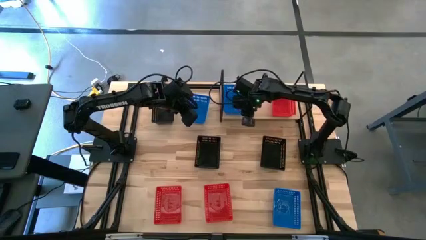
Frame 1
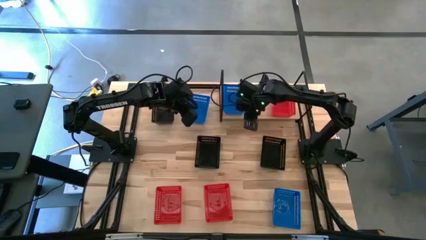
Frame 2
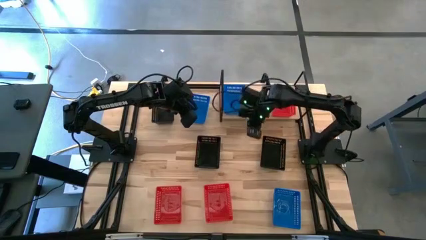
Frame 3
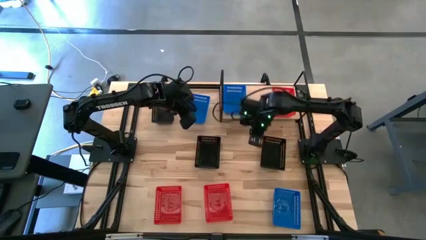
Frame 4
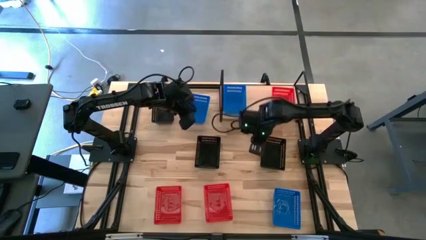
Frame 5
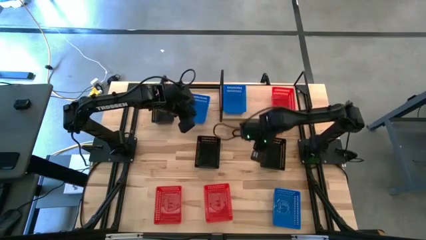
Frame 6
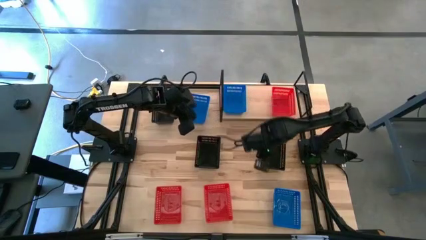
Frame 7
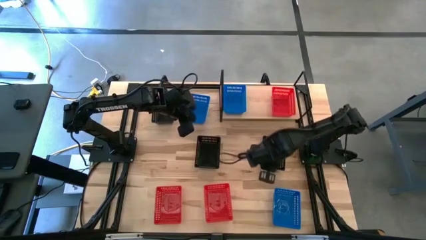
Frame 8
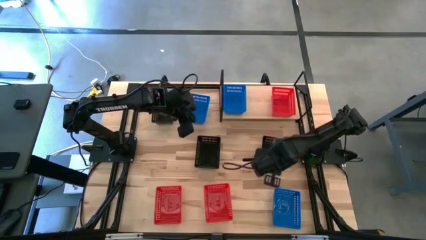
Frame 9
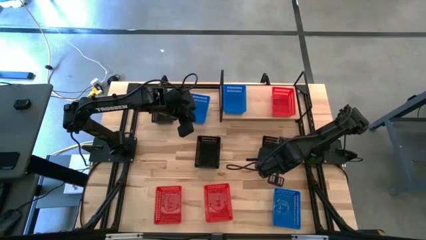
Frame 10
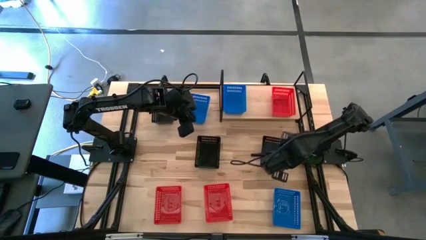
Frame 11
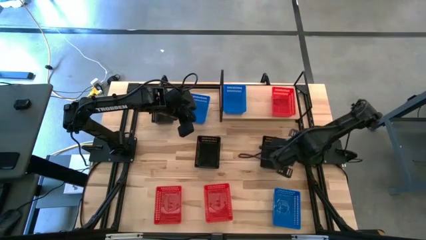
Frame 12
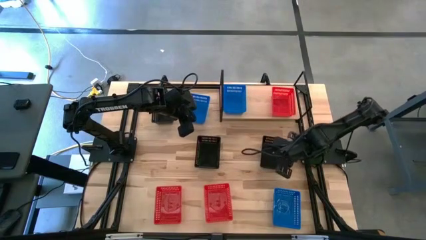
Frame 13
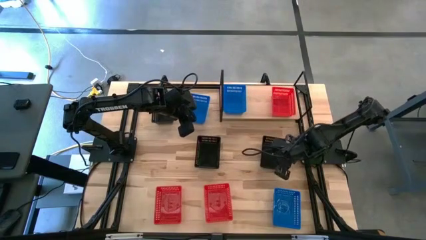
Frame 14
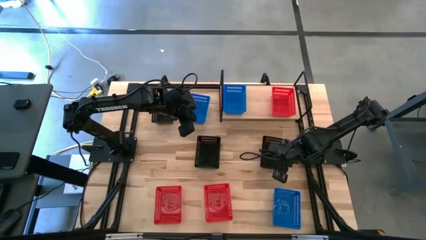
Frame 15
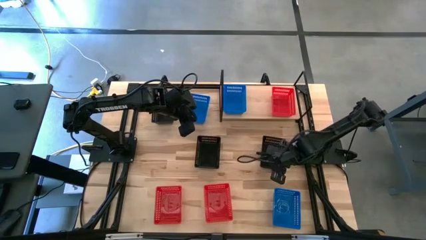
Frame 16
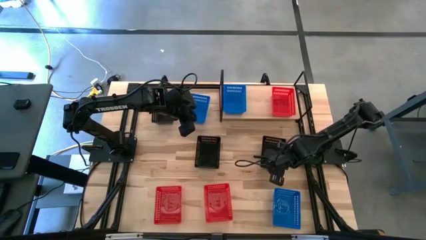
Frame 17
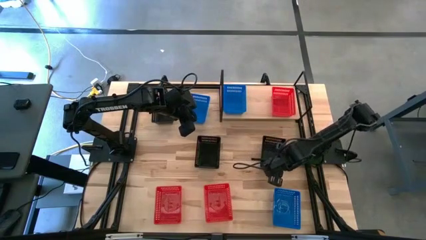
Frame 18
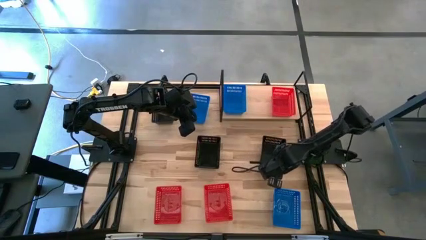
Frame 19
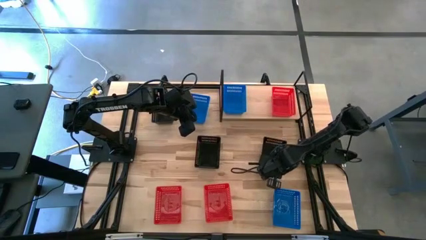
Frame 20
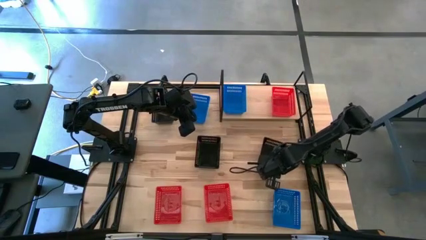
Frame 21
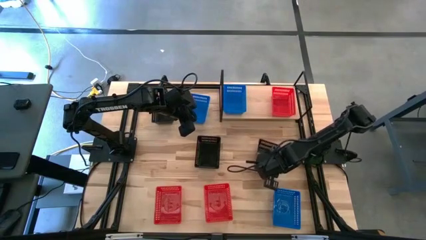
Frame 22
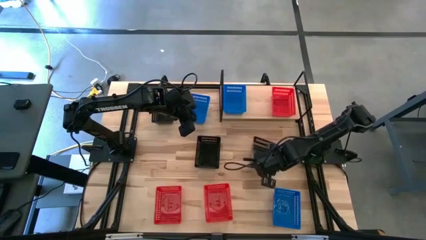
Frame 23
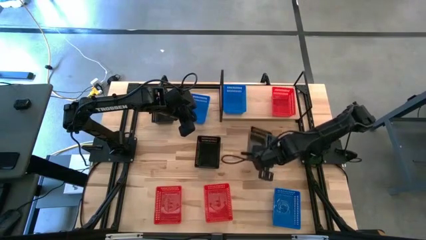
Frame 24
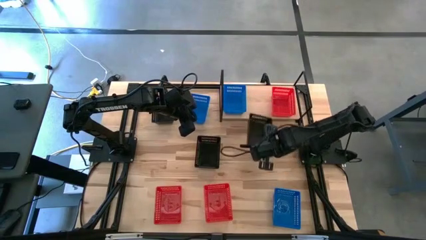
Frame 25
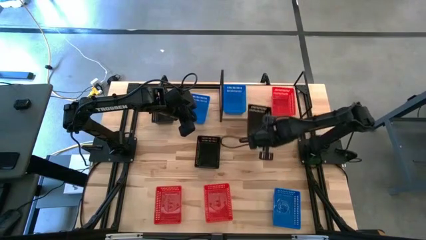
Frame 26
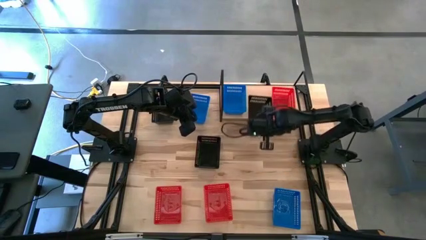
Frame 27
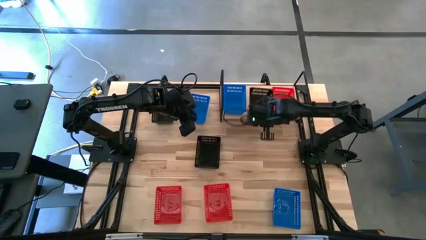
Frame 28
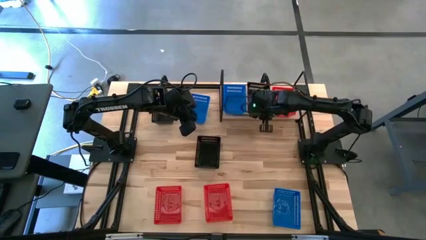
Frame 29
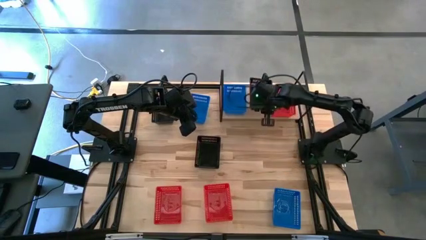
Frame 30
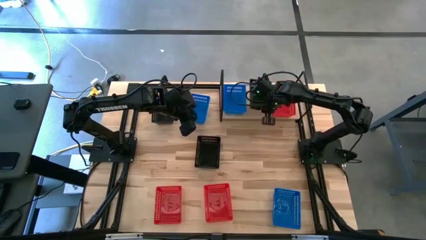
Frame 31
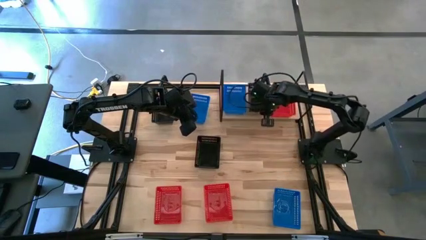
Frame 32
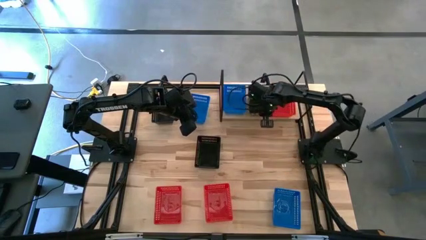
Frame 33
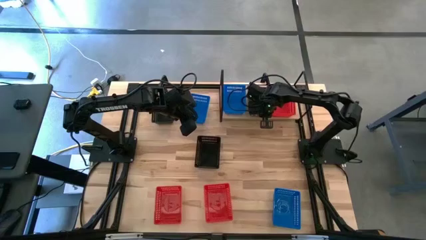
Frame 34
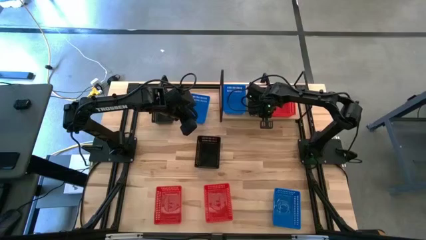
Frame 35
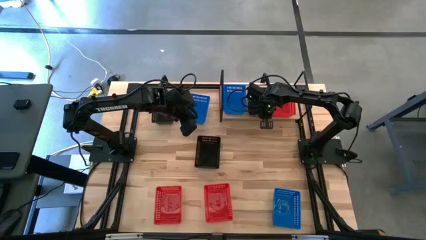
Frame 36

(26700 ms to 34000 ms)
Task: Stack baskets on shelf by color
Put the bottom right black bin on the shelf

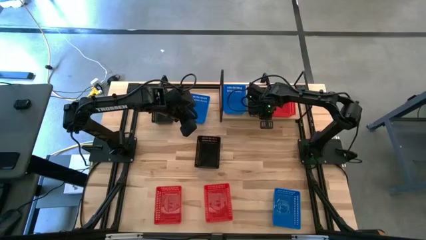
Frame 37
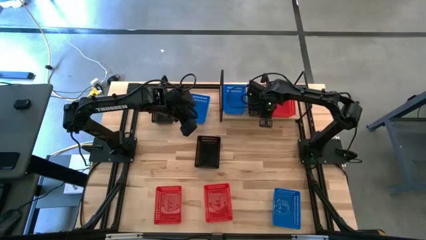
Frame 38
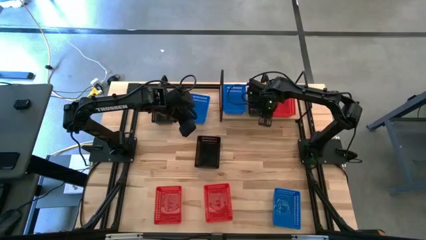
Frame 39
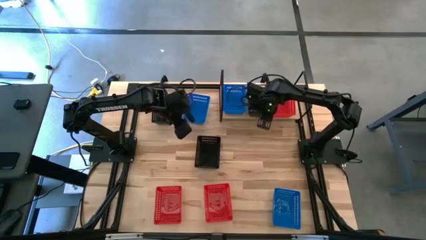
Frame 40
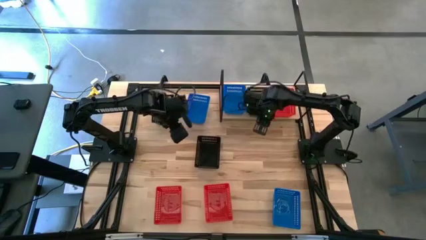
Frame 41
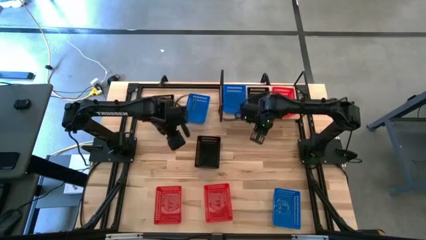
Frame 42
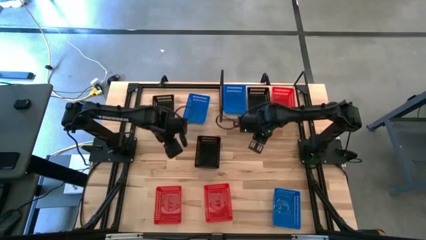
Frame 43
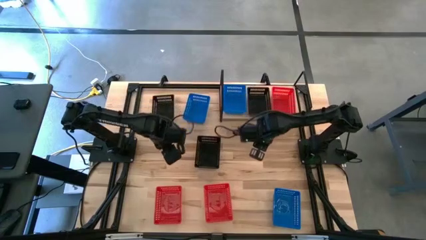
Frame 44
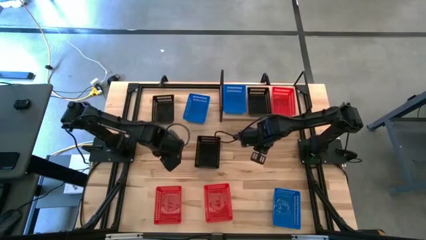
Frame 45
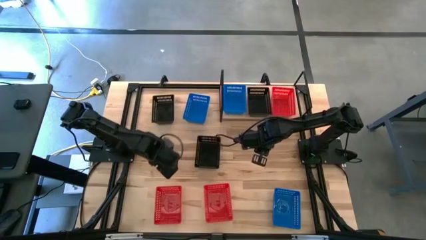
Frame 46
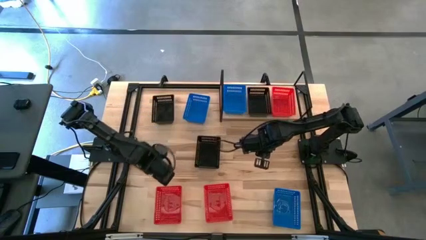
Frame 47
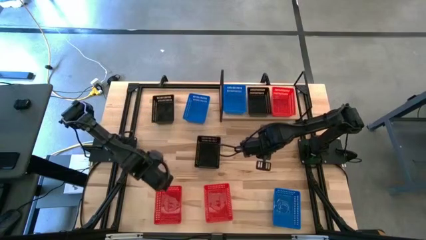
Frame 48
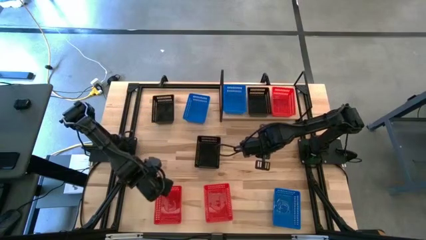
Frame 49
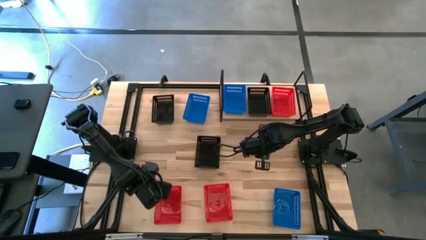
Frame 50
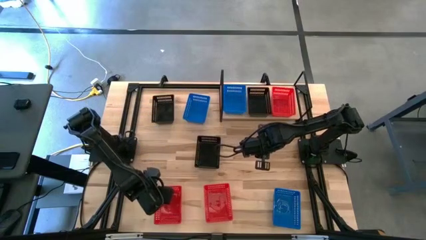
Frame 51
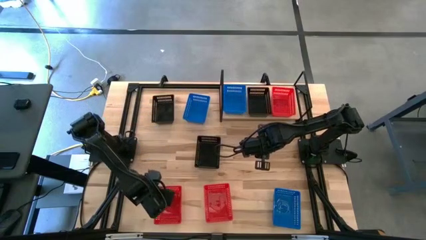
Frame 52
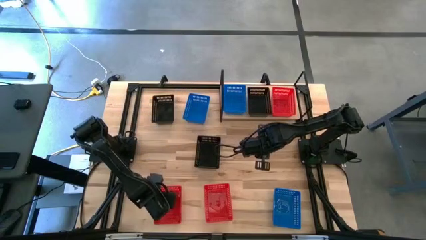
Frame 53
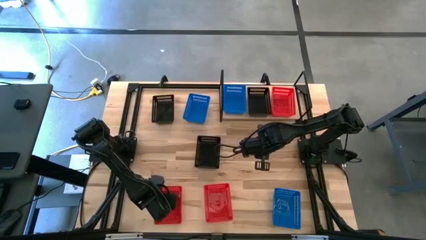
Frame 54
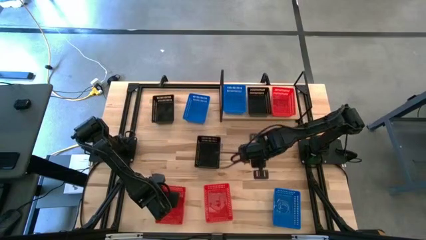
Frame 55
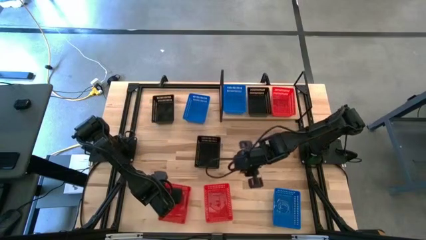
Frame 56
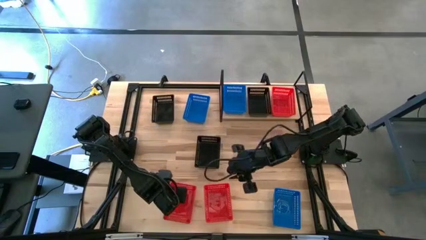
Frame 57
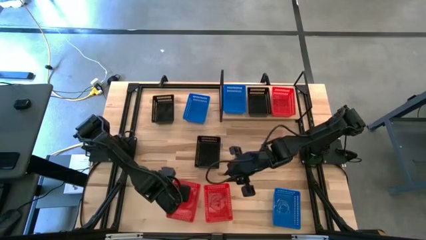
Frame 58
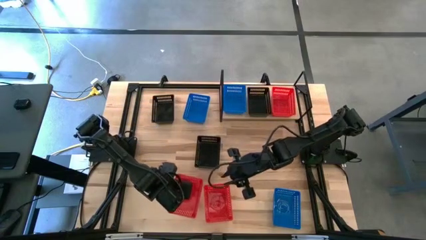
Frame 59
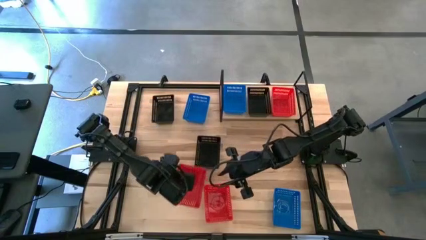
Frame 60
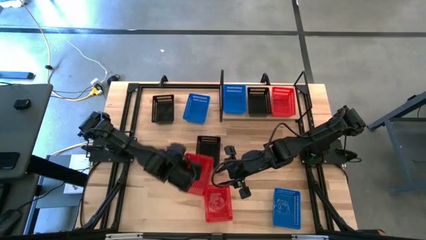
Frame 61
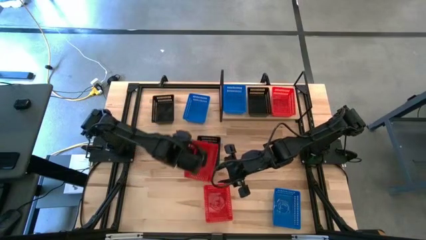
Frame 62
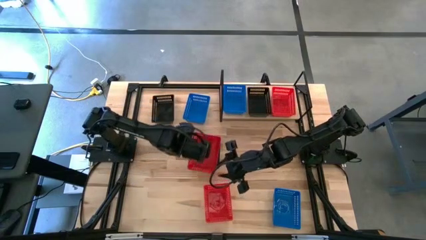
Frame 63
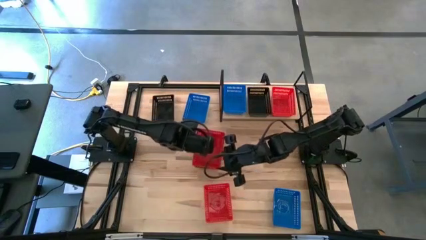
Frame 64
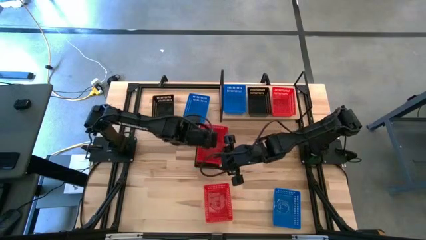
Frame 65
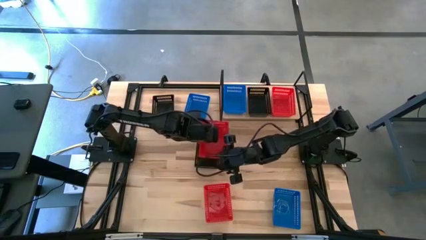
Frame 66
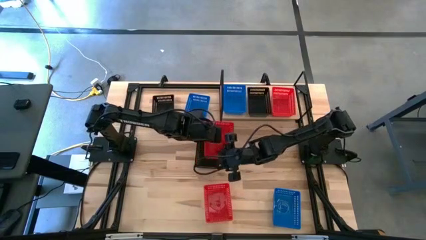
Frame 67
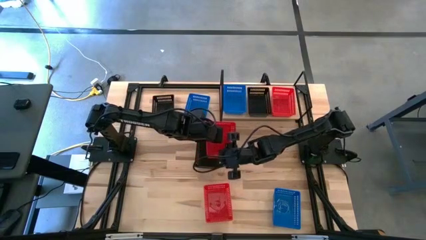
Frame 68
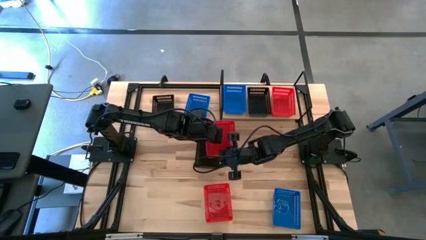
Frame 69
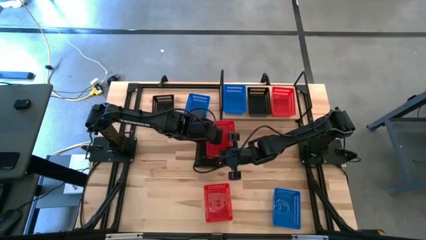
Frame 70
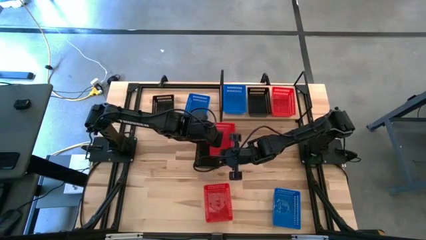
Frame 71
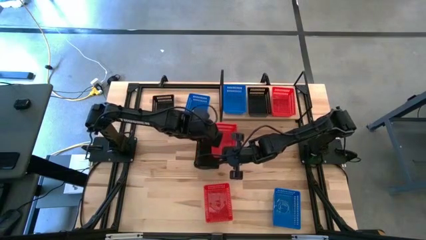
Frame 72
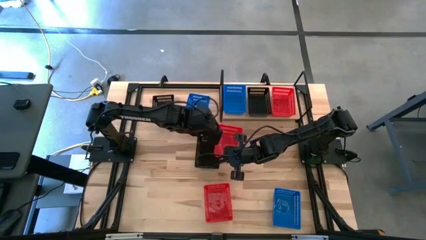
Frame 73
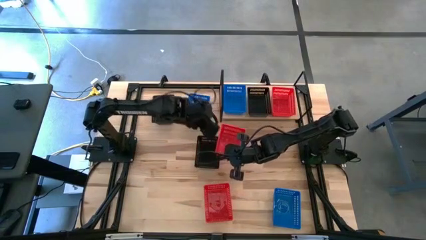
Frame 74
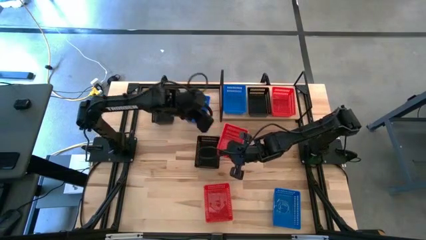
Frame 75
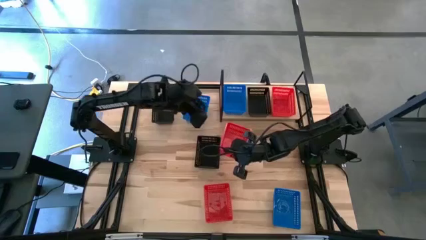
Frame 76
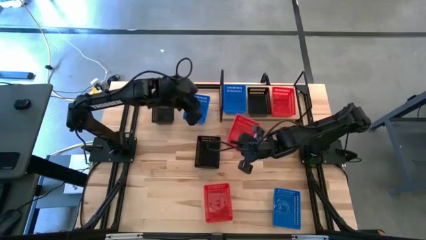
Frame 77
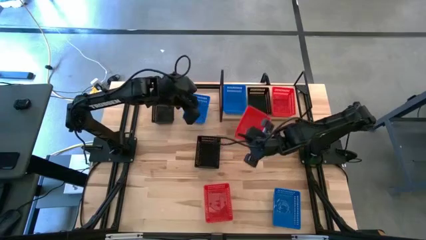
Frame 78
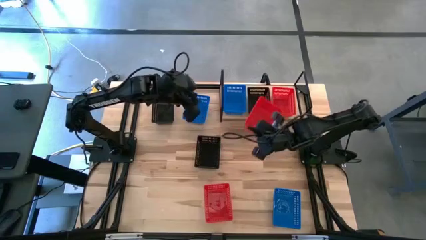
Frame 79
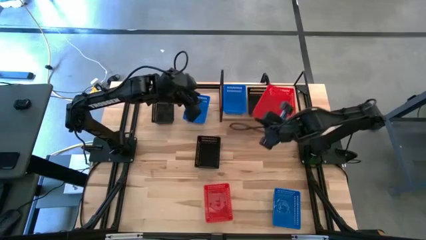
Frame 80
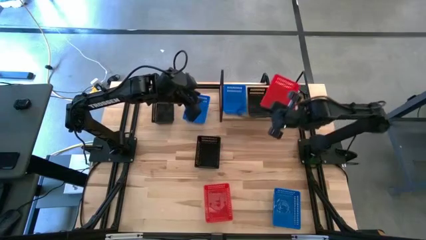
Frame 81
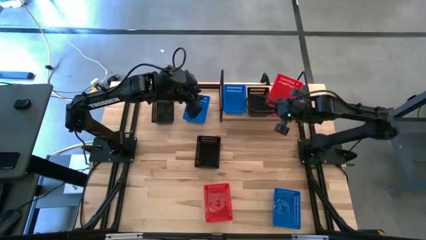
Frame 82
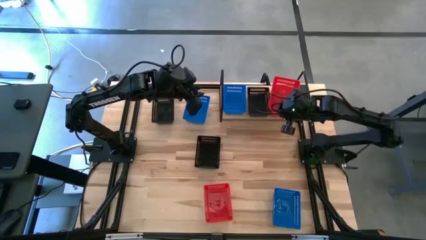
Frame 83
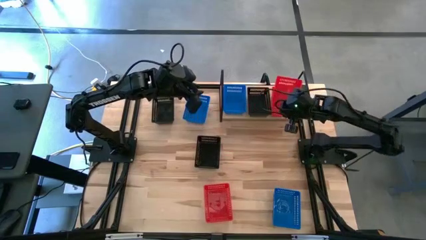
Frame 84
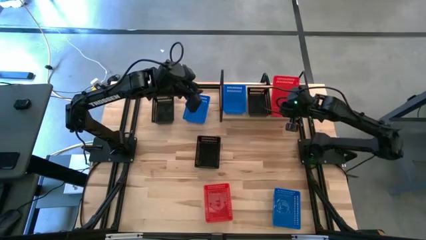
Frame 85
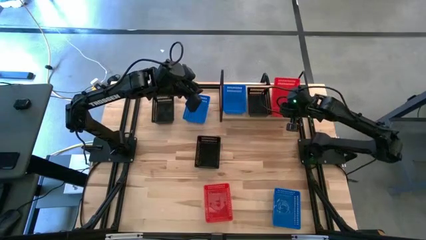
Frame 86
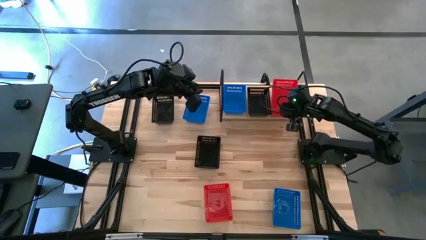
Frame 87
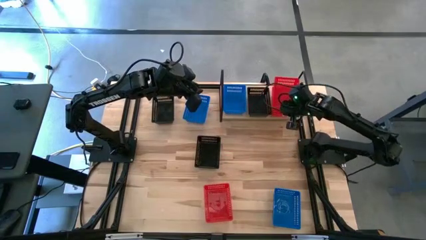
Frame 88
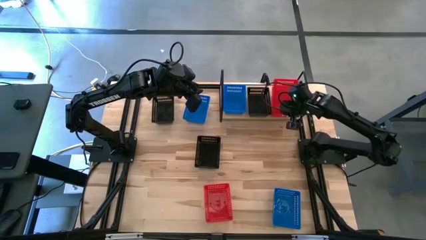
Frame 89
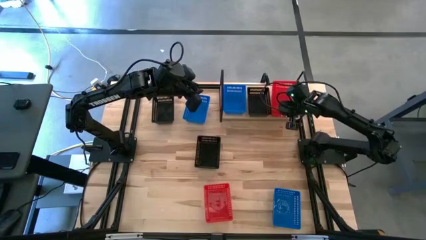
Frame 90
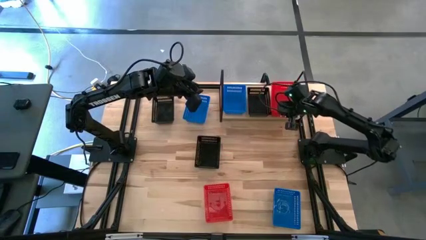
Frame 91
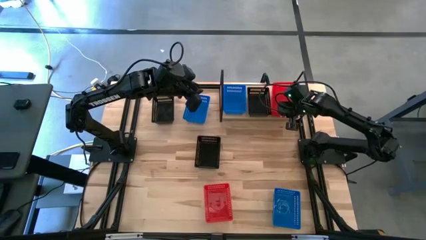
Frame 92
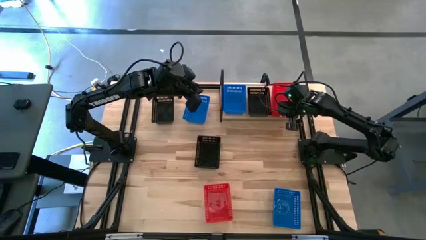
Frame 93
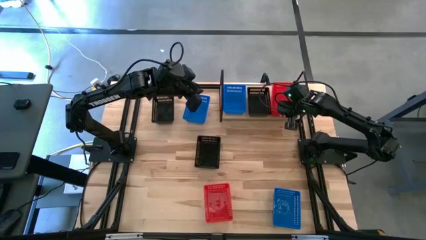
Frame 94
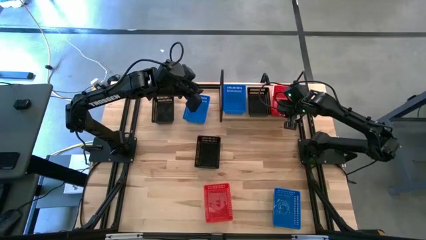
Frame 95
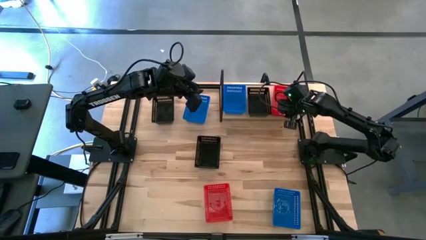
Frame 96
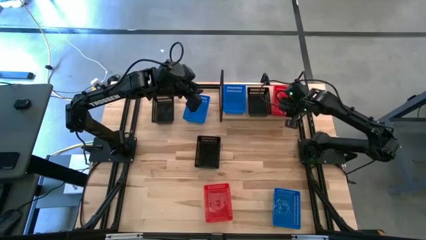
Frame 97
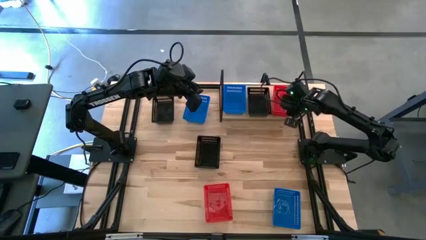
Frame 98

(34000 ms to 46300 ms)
Stack the left red bin on top of the other red bin on the shelf
